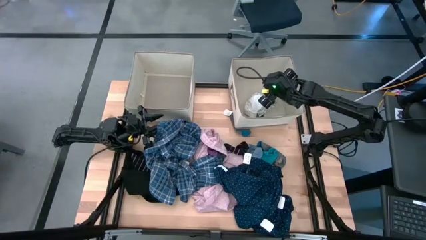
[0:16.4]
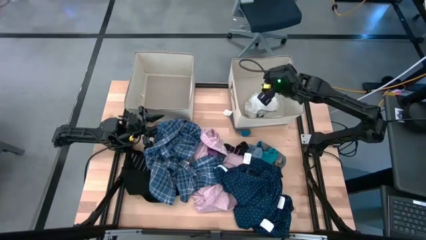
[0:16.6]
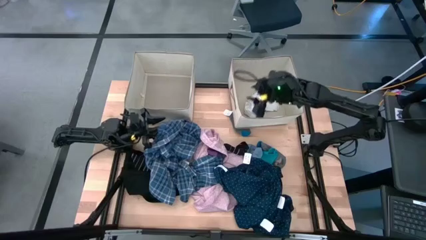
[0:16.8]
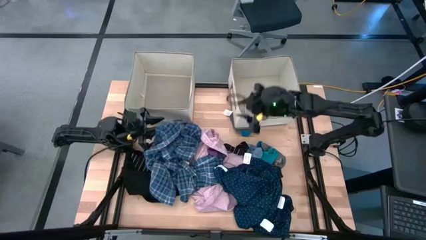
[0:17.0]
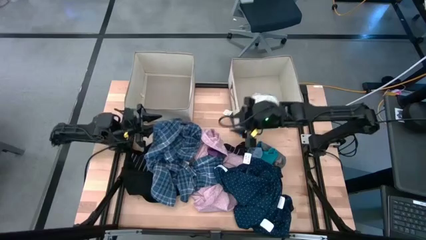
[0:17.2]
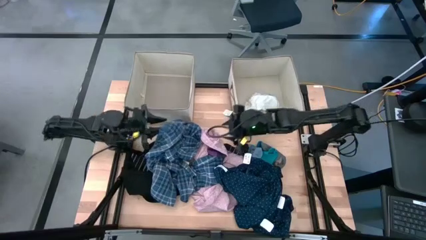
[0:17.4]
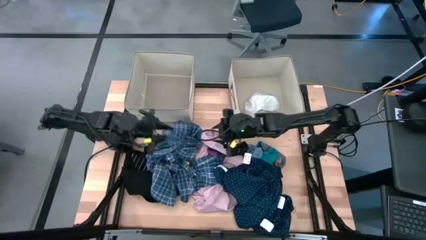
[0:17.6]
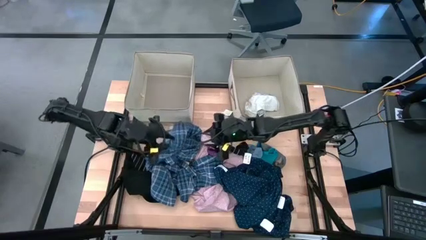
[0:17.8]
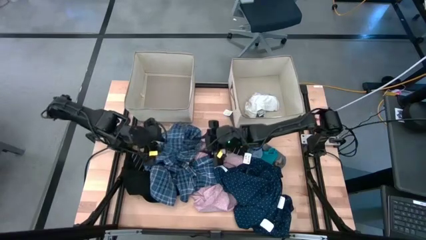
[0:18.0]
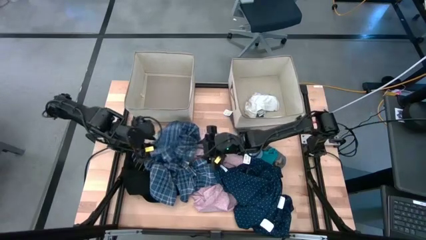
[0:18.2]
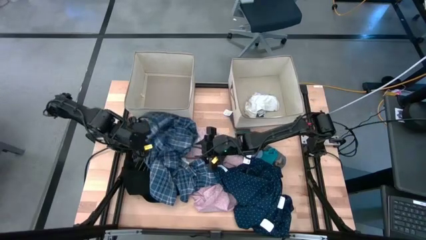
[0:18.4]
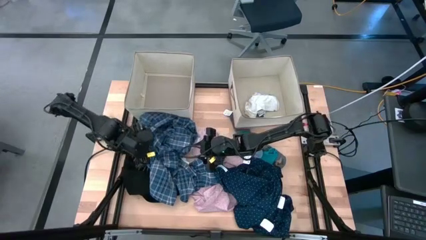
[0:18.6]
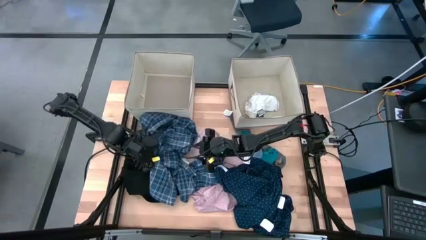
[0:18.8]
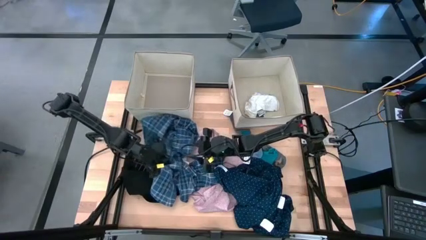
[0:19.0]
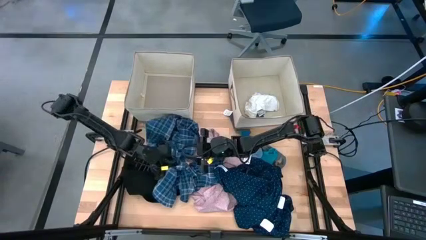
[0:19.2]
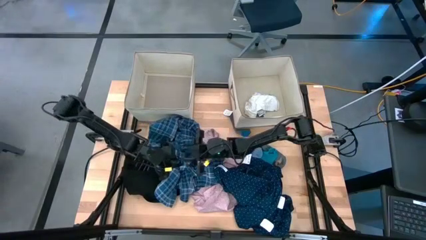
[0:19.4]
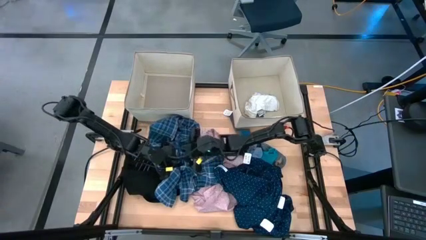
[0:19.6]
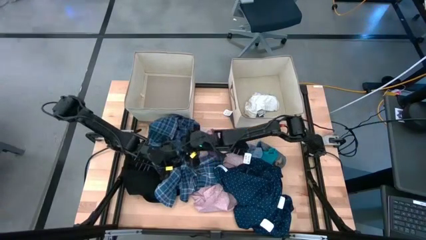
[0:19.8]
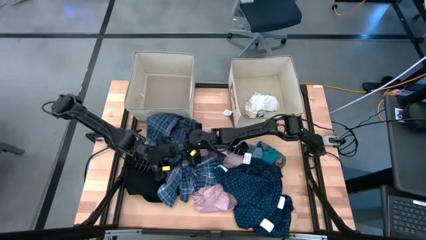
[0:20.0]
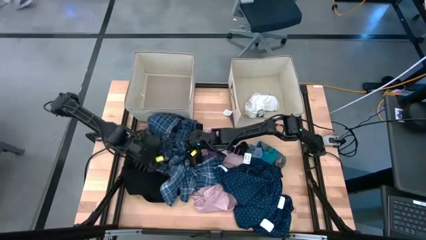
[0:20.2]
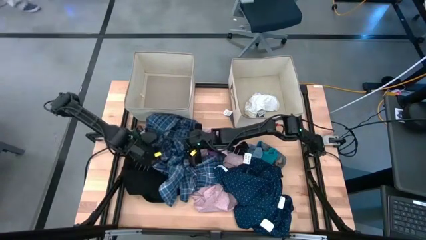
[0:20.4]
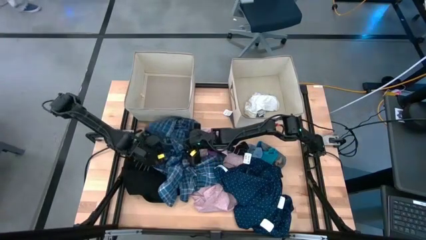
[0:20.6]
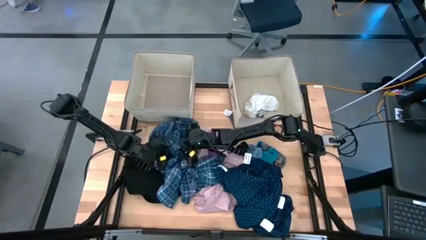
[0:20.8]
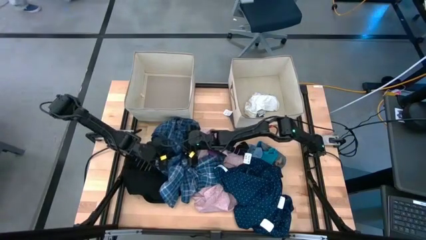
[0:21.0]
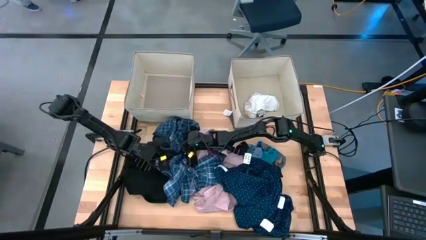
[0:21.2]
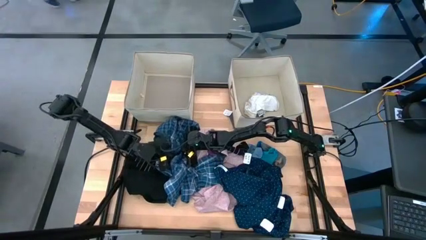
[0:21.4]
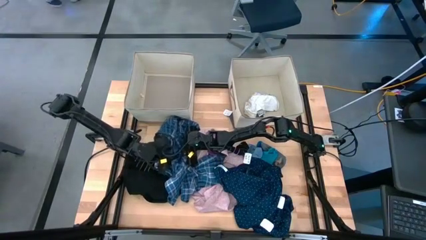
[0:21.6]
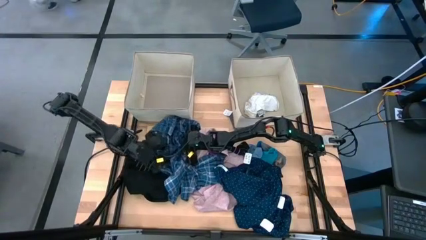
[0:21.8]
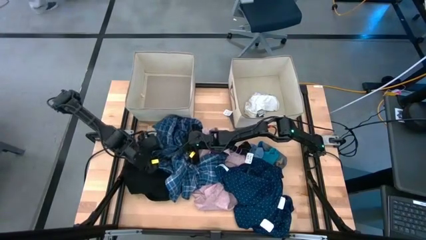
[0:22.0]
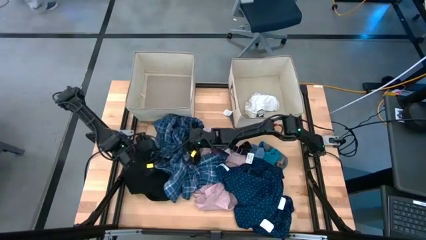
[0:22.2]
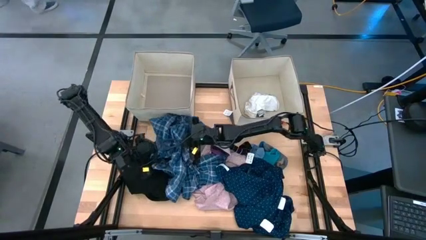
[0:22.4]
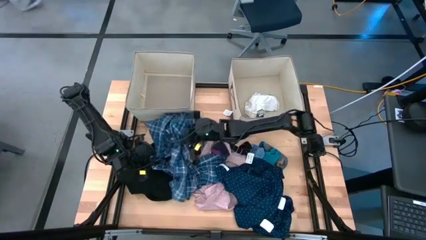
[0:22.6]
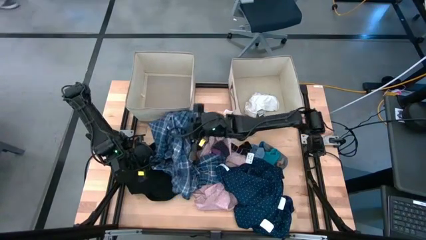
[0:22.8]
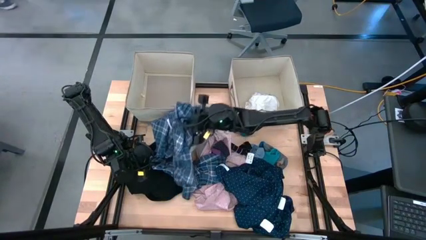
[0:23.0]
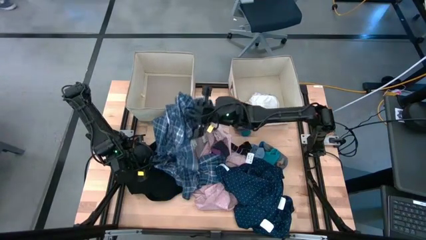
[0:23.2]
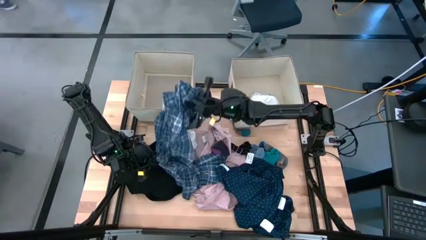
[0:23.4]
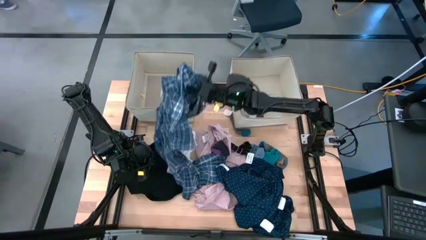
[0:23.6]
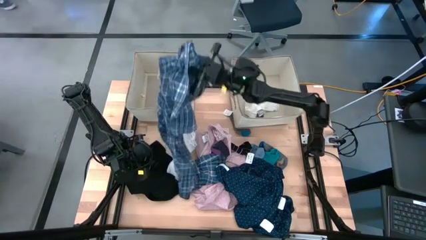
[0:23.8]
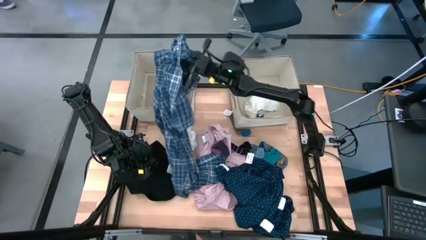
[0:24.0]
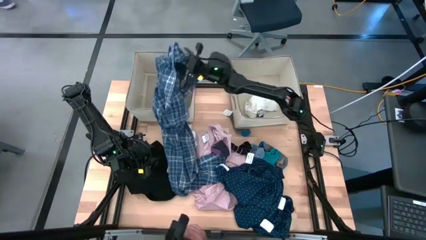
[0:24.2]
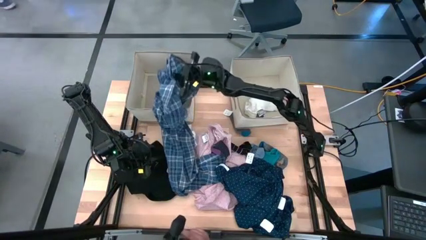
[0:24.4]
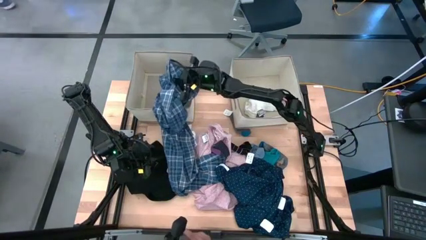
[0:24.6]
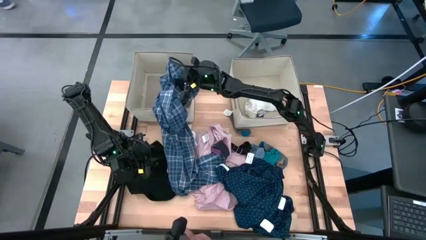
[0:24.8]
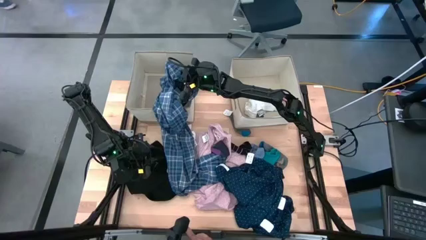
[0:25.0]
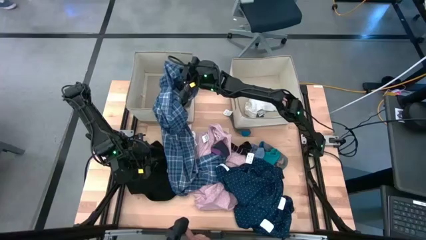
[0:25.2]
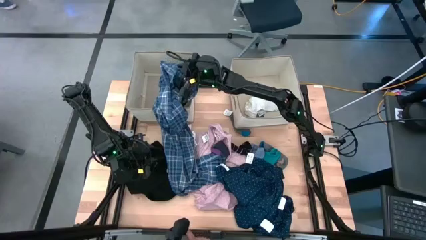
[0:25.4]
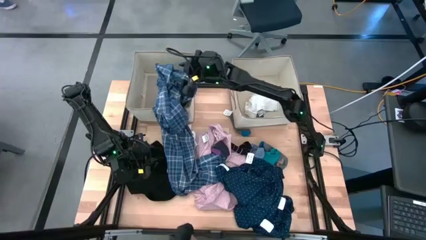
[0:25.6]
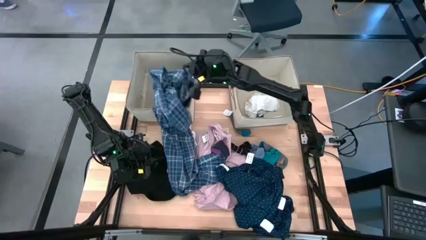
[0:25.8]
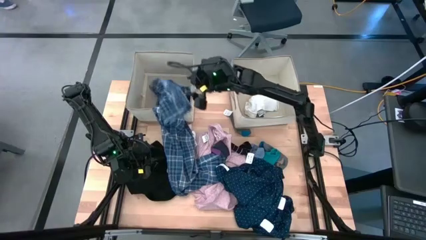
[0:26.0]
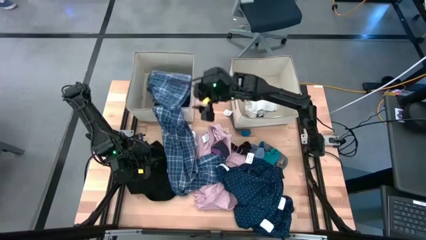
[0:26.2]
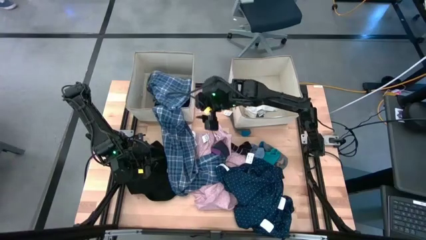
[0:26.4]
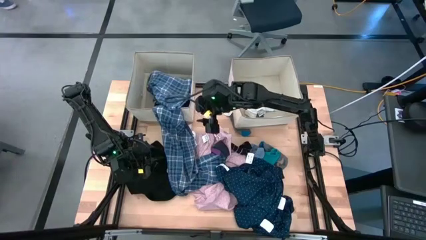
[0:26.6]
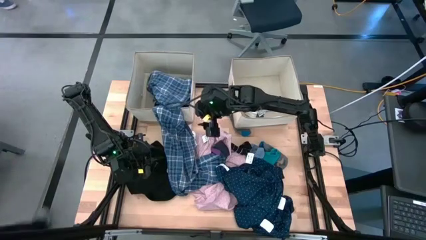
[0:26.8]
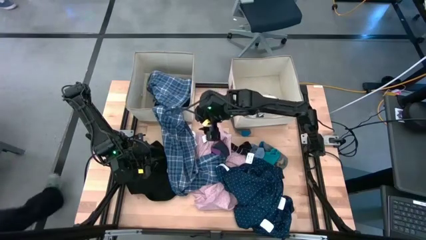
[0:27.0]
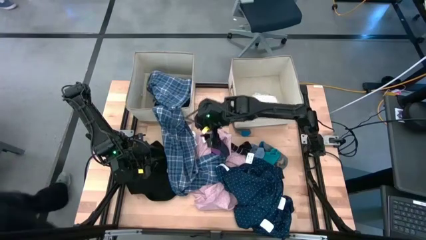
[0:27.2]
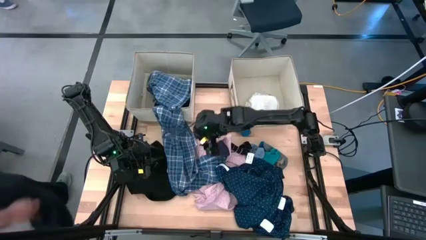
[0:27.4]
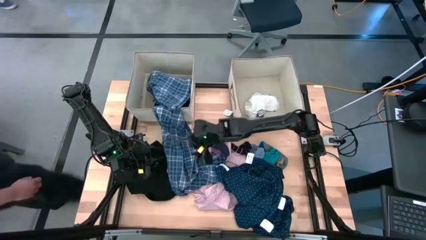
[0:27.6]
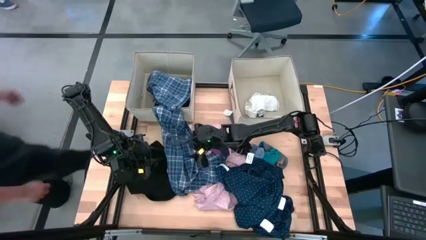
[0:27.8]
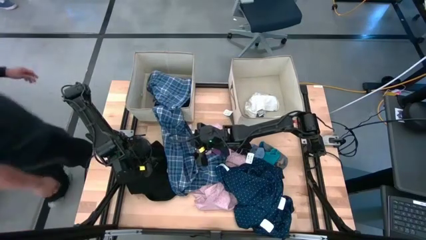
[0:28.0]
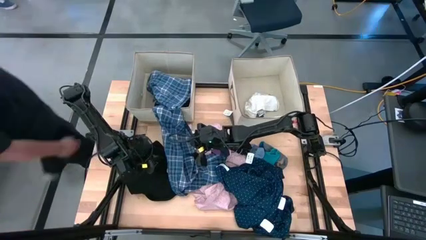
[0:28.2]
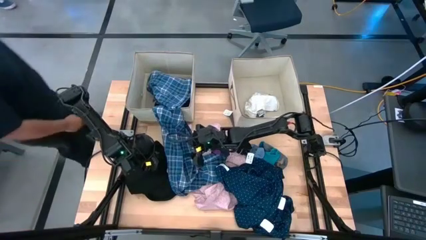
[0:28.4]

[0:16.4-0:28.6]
Task: Sort clothes
Put the blue checkered polo shirt into the left brown laundry organizer
